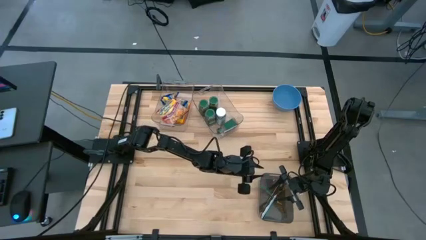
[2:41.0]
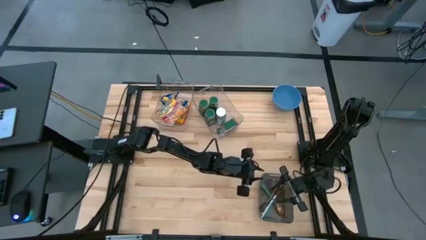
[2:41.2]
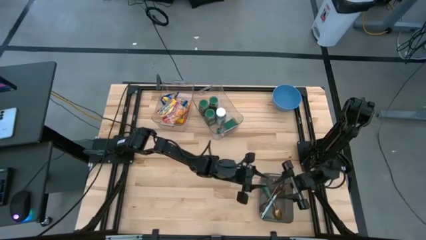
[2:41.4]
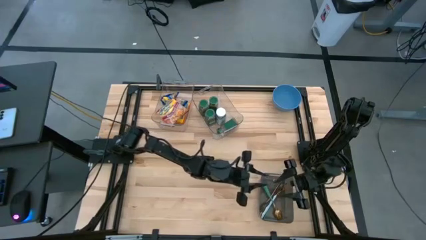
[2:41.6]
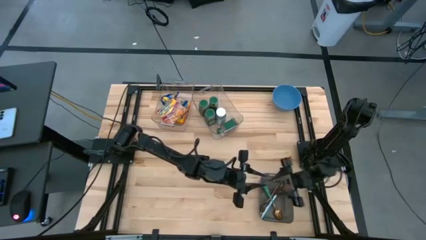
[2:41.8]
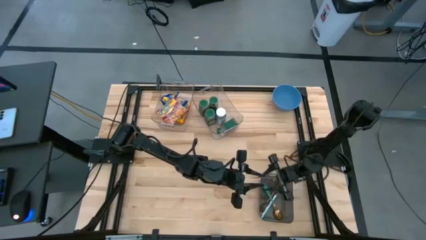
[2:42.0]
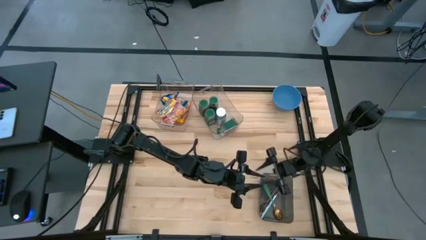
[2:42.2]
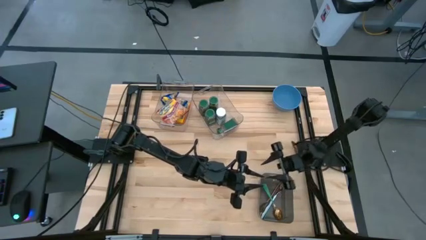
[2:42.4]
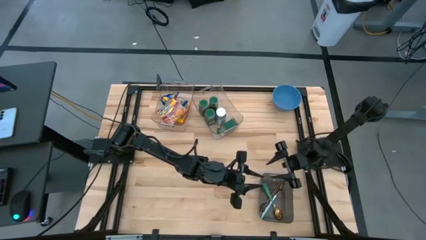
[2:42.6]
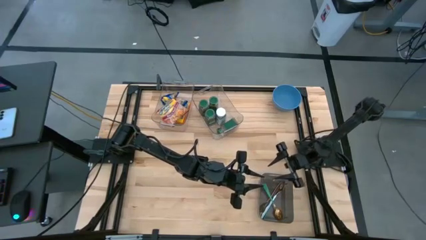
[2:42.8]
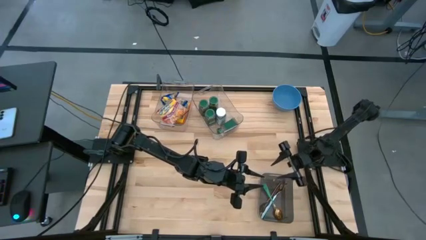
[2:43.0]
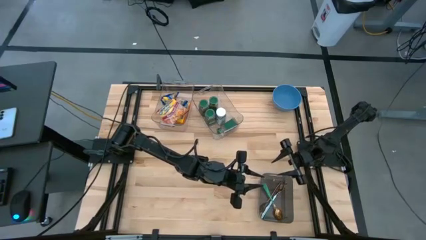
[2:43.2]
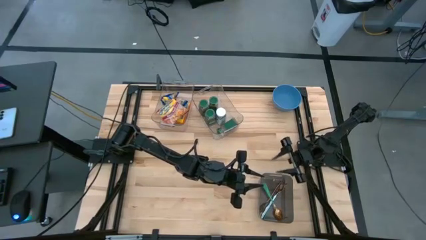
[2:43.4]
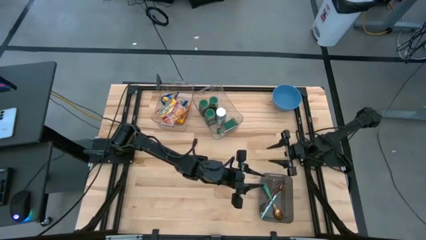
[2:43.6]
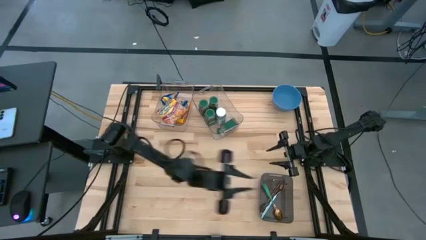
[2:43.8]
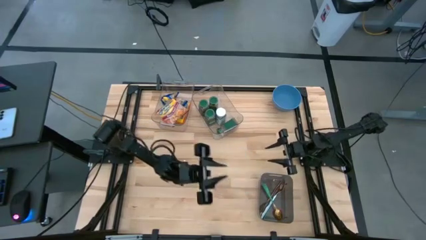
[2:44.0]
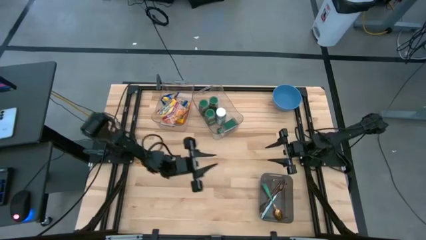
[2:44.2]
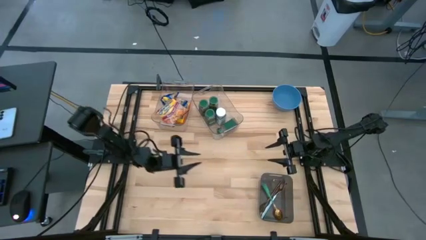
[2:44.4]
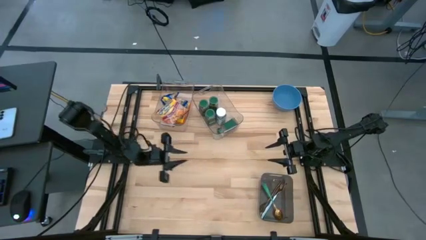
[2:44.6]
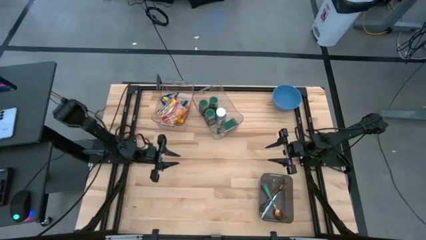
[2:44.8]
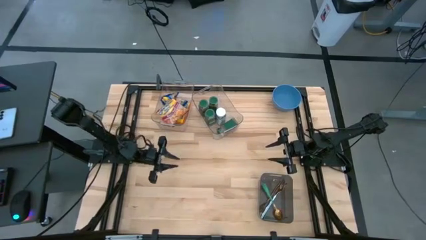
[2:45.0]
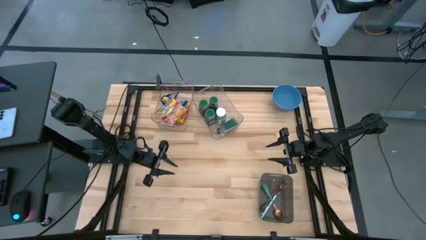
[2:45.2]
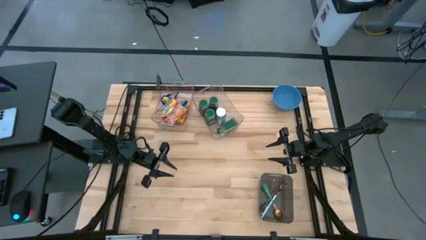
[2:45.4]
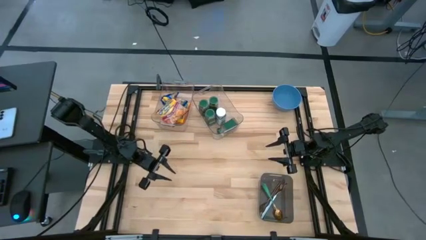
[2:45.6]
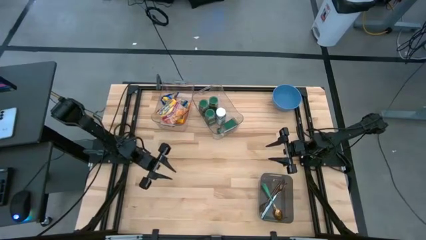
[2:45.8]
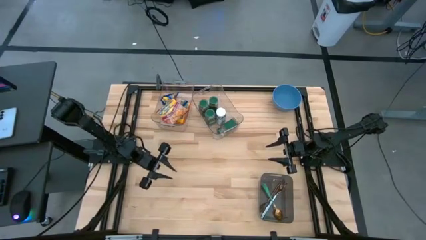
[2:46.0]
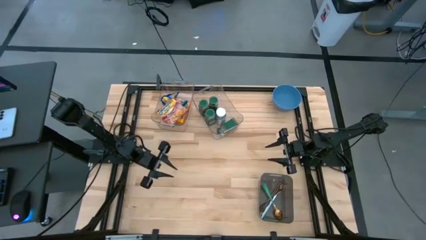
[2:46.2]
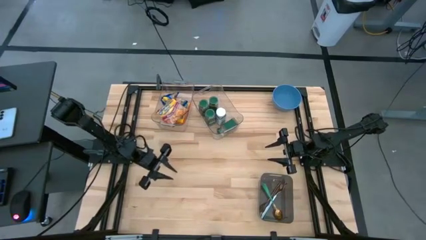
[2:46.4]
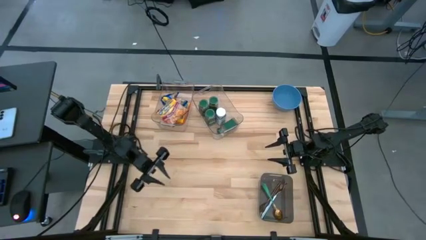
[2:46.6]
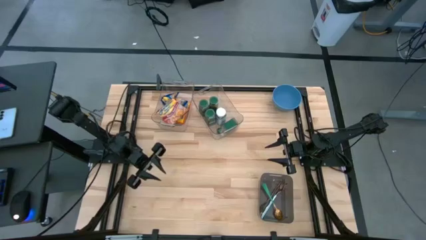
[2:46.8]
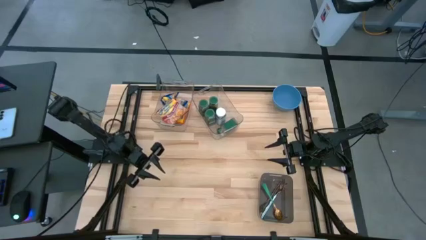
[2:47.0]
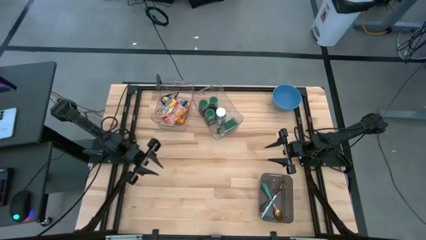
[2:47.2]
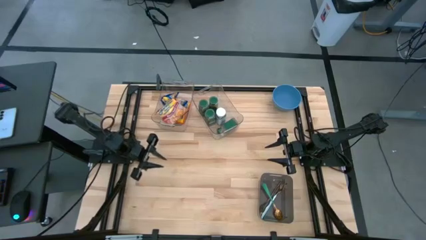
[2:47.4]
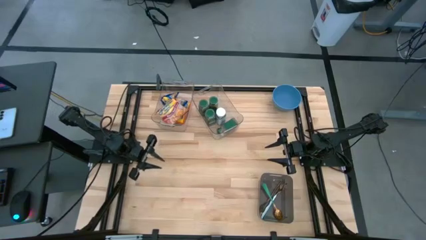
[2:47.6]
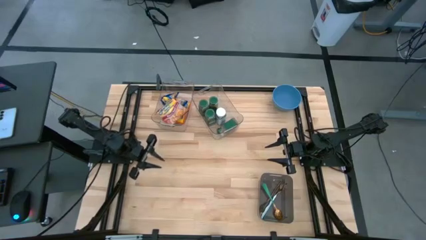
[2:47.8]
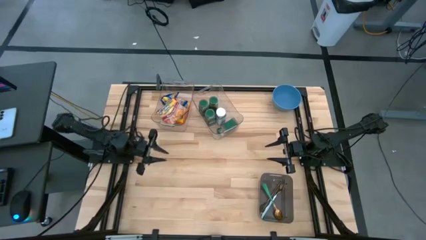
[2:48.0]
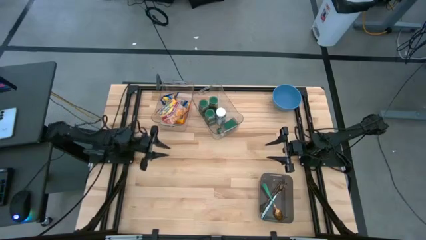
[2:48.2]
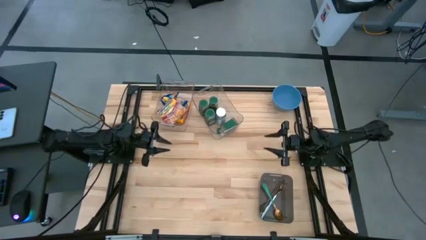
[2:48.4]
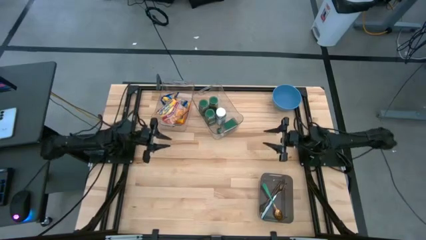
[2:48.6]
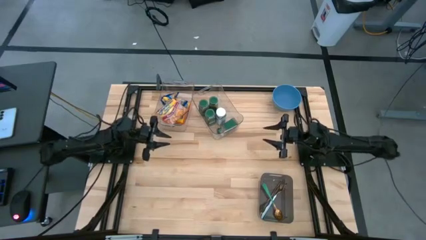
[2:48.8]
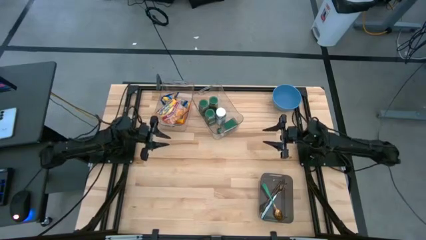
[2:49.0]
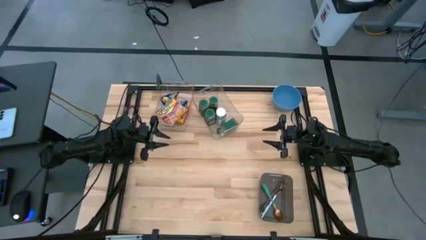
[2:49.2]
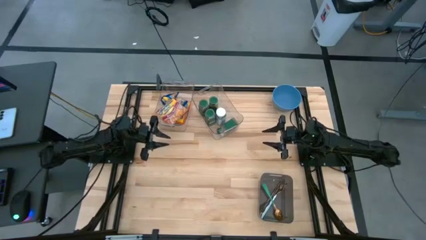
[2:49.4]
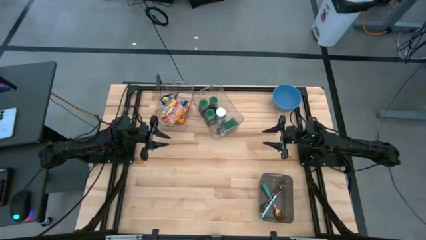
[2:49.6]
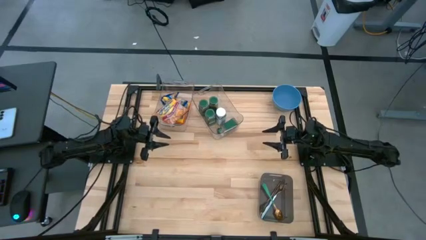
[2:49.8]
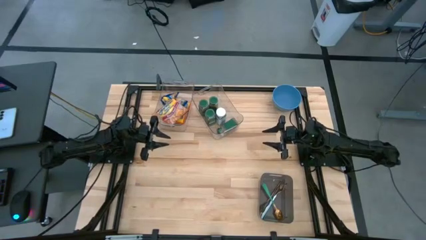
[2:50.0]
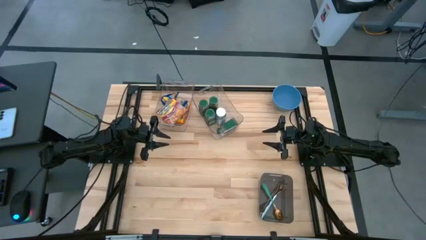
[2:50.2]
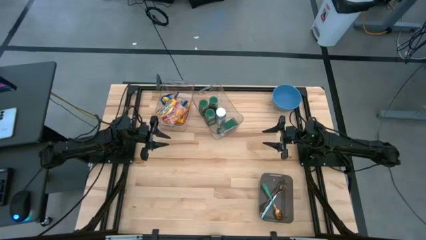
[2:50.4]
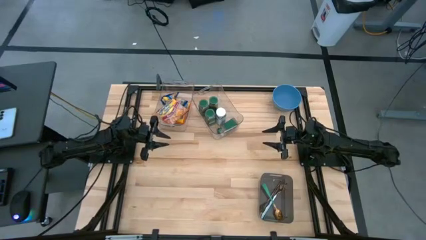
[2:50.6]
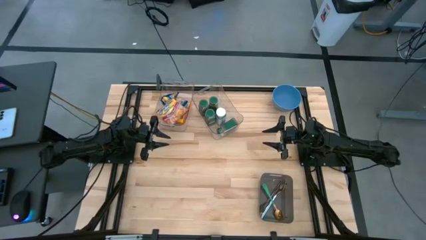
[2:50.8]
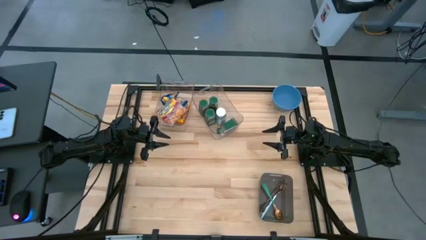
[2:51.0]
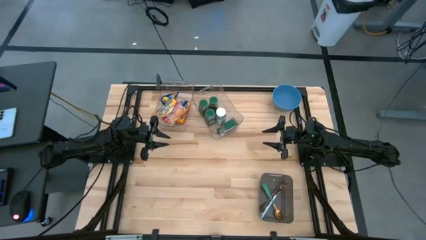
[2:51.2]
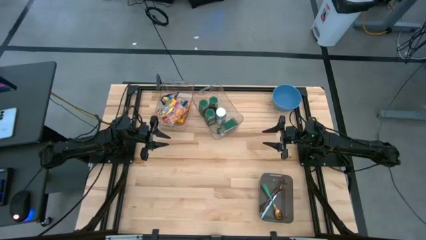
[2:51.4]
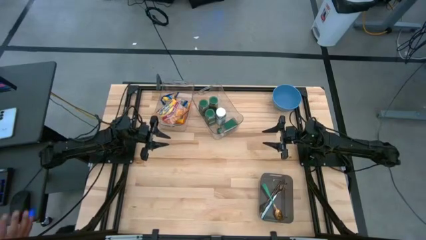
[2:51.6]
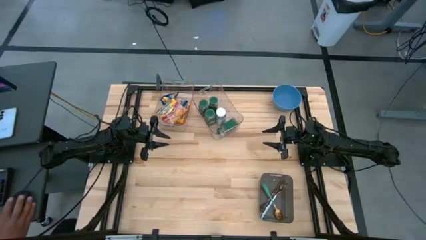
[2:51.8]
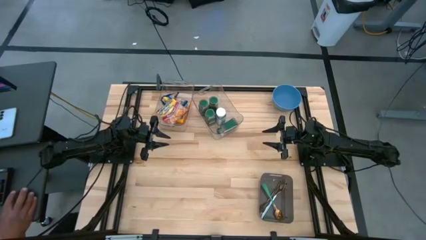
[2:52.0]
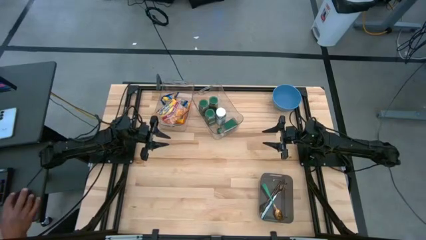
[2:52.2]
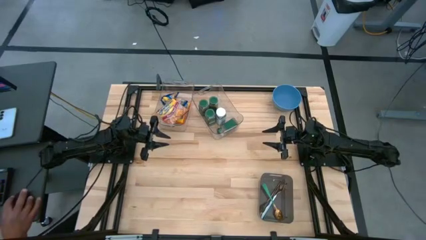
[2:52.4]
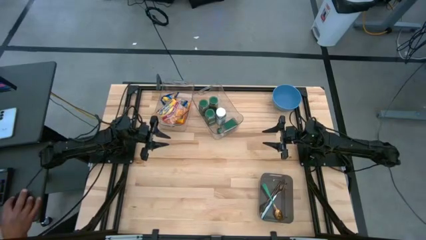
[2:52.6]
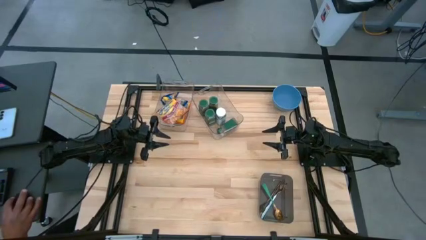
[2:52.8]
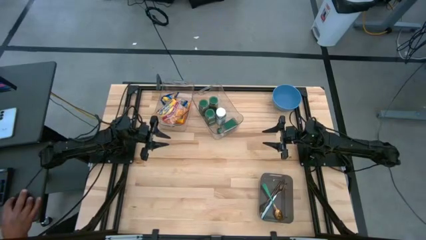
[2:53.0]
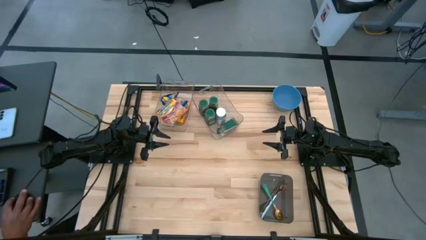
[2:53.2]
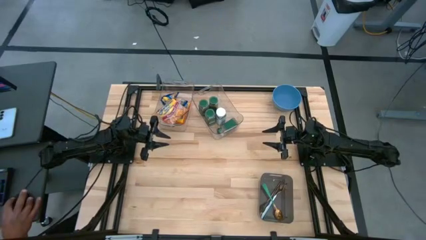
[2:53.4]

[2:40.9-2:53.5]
Return to Home Position
